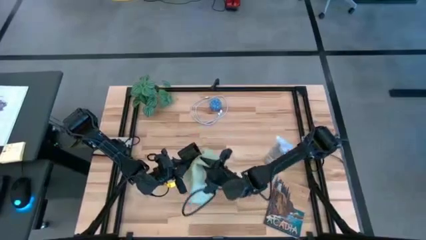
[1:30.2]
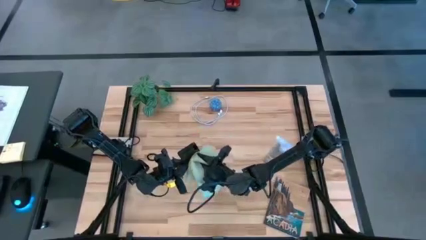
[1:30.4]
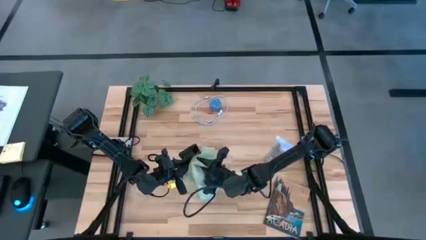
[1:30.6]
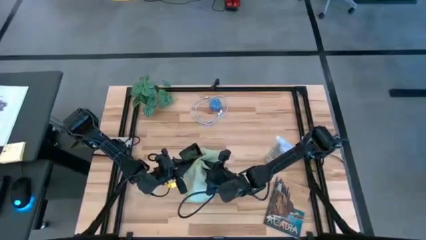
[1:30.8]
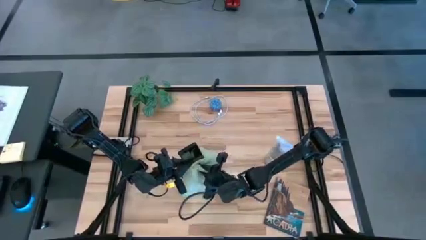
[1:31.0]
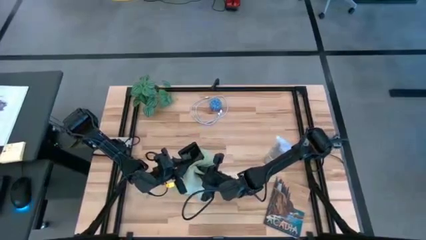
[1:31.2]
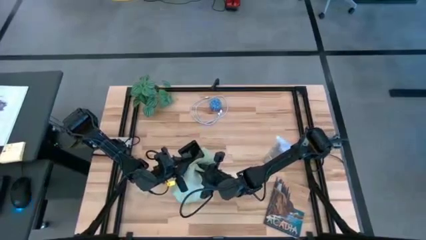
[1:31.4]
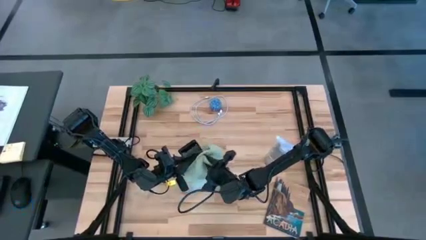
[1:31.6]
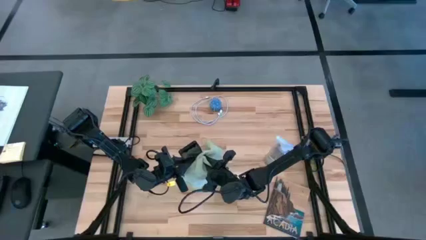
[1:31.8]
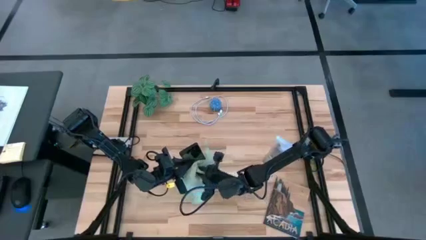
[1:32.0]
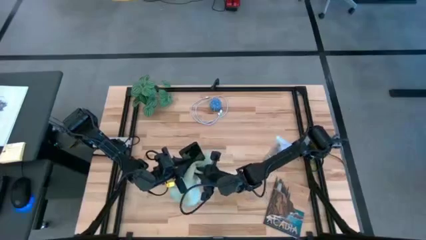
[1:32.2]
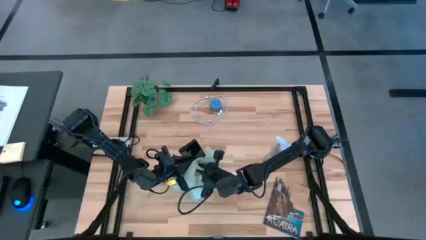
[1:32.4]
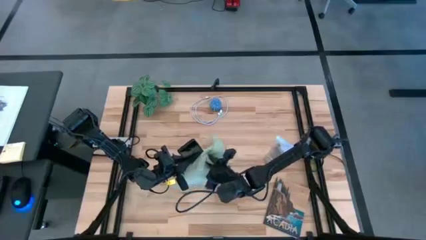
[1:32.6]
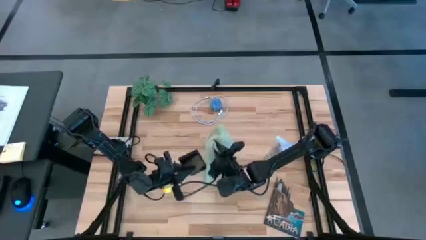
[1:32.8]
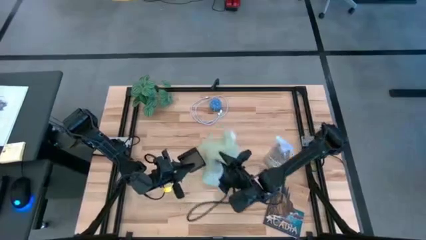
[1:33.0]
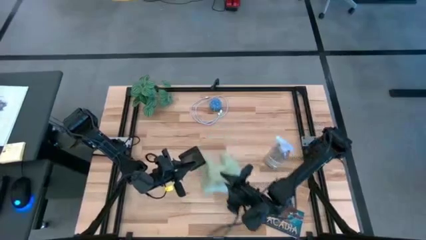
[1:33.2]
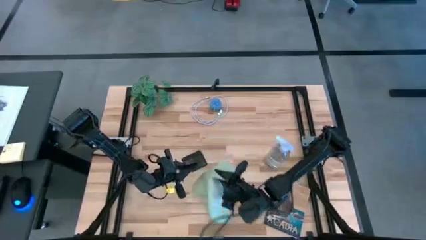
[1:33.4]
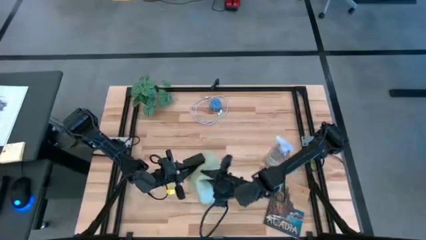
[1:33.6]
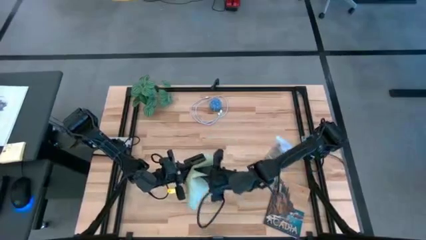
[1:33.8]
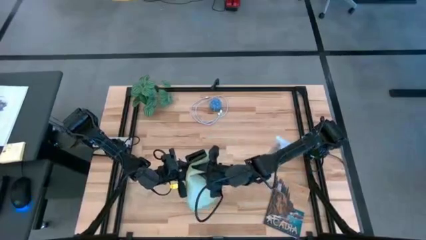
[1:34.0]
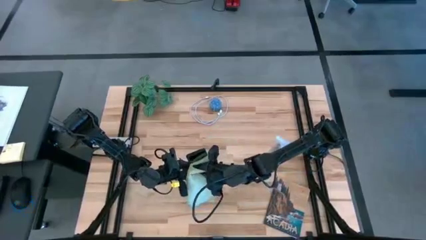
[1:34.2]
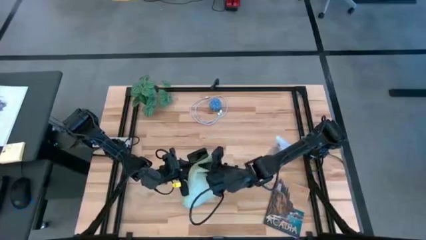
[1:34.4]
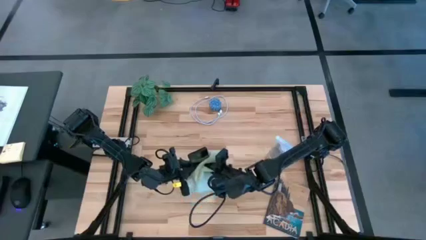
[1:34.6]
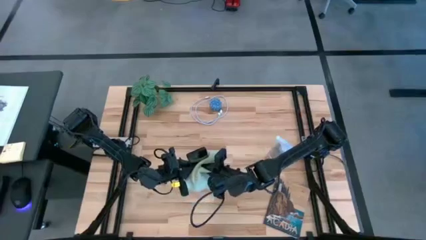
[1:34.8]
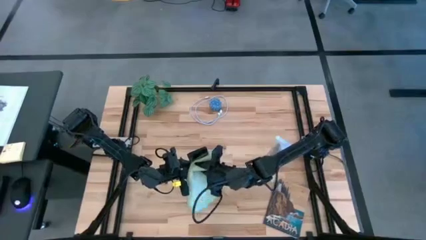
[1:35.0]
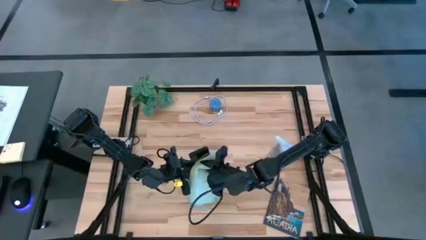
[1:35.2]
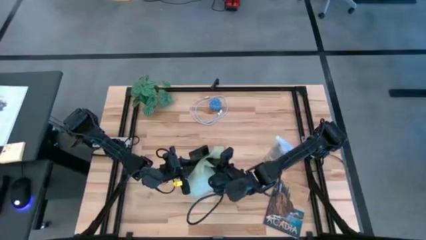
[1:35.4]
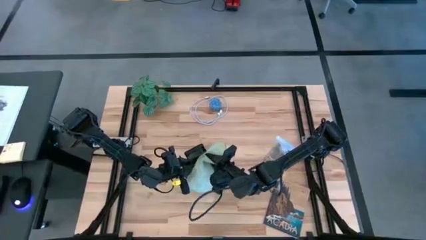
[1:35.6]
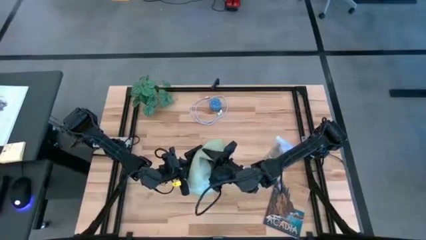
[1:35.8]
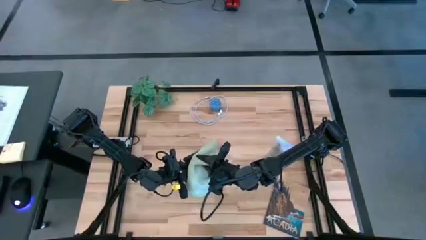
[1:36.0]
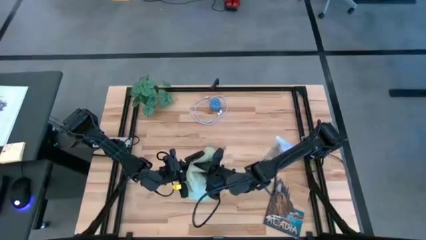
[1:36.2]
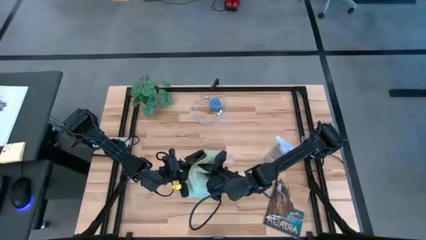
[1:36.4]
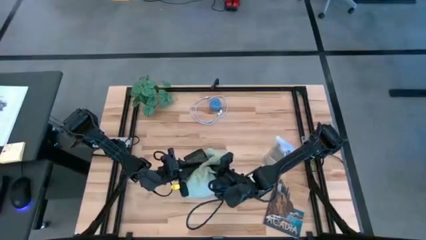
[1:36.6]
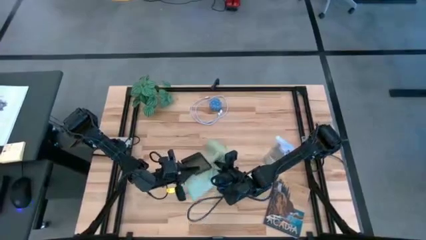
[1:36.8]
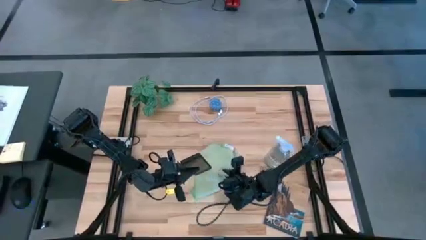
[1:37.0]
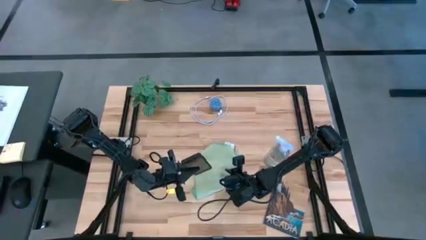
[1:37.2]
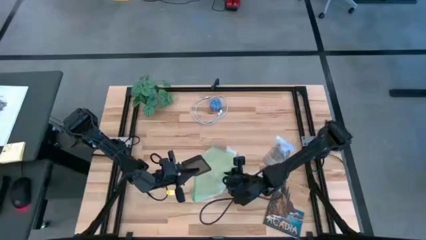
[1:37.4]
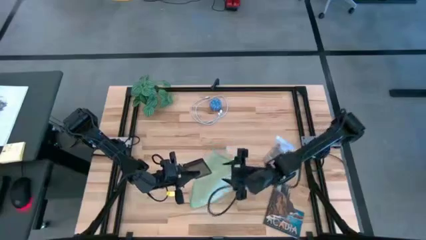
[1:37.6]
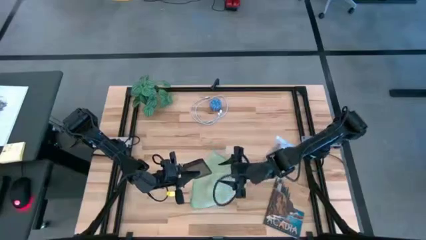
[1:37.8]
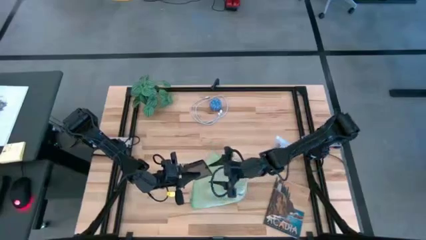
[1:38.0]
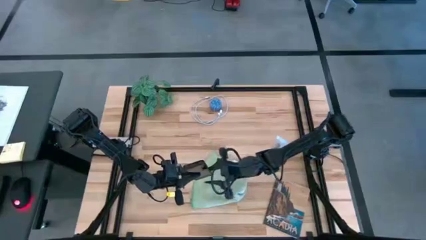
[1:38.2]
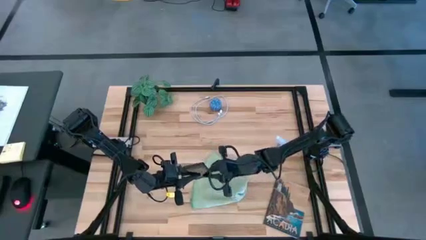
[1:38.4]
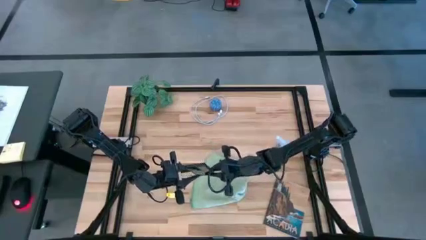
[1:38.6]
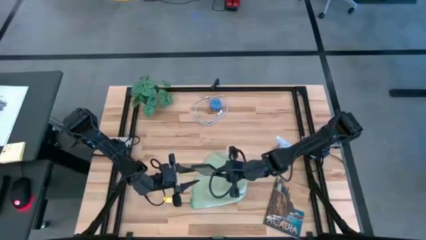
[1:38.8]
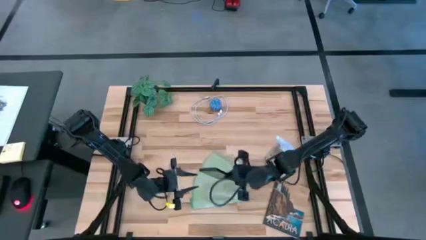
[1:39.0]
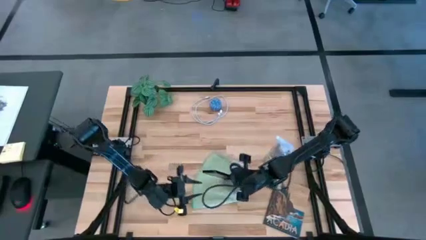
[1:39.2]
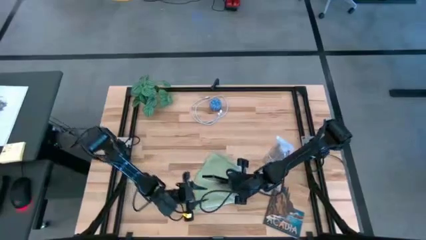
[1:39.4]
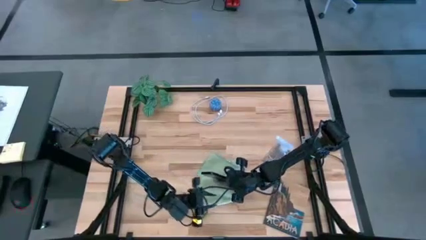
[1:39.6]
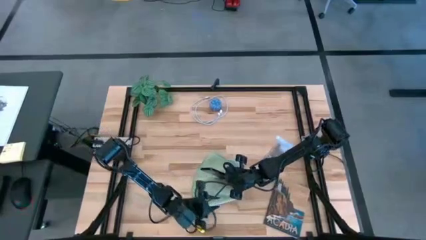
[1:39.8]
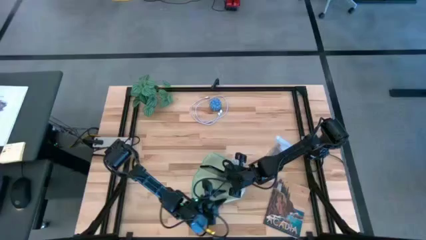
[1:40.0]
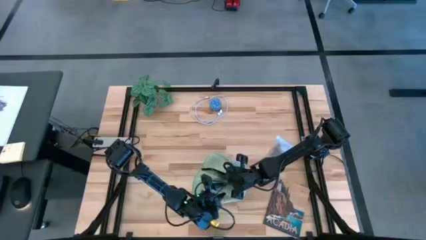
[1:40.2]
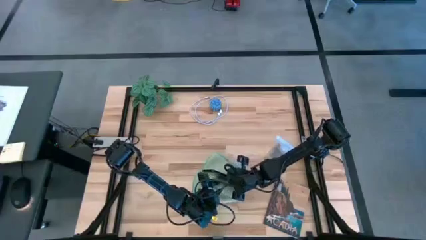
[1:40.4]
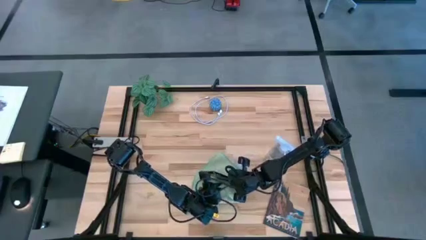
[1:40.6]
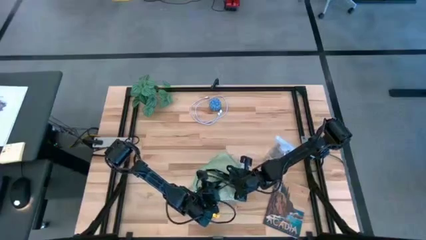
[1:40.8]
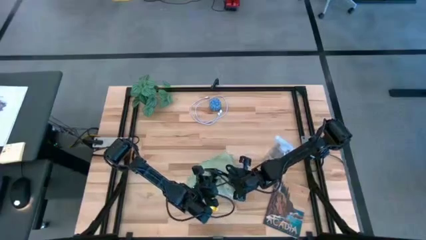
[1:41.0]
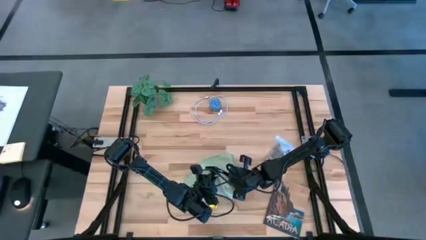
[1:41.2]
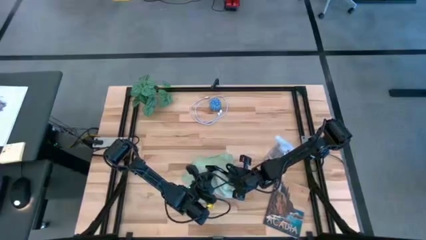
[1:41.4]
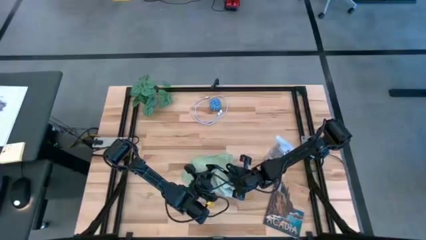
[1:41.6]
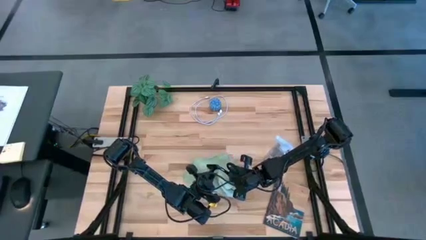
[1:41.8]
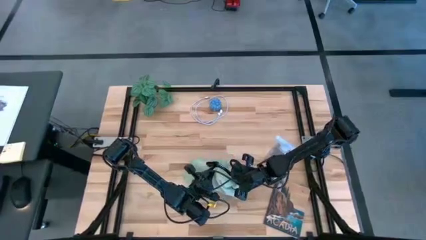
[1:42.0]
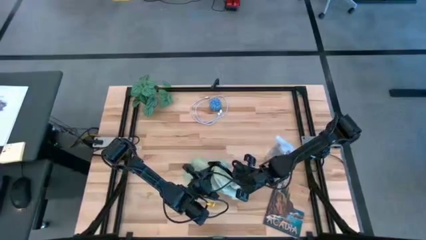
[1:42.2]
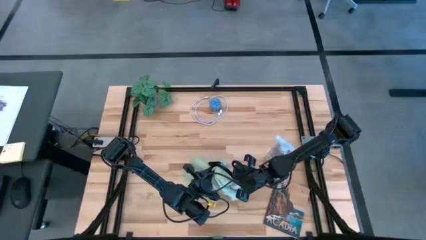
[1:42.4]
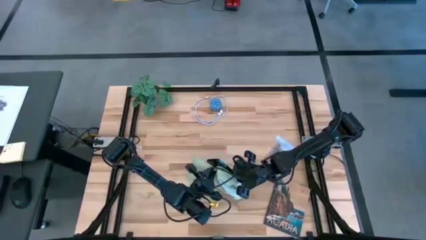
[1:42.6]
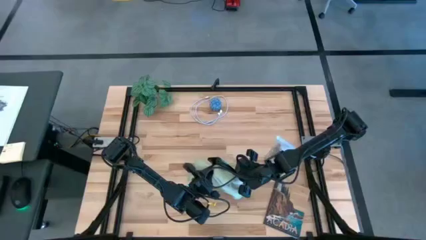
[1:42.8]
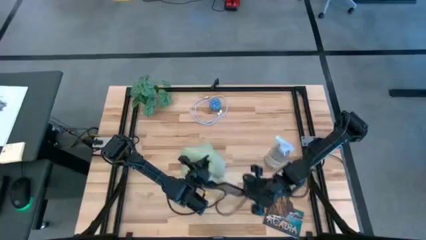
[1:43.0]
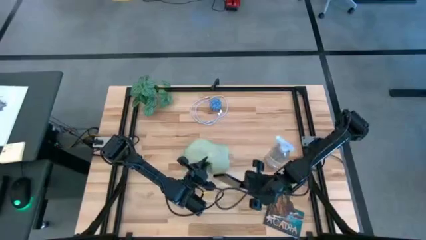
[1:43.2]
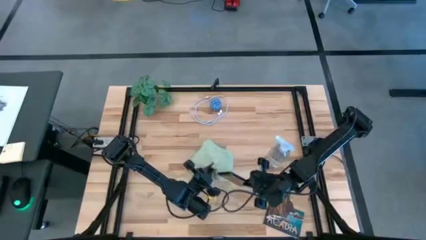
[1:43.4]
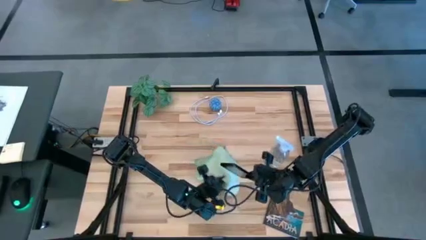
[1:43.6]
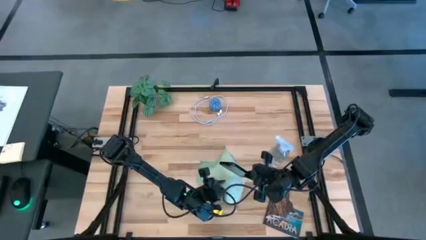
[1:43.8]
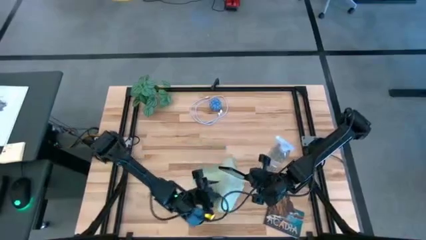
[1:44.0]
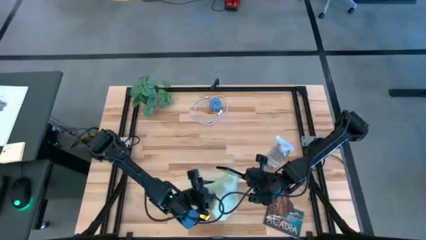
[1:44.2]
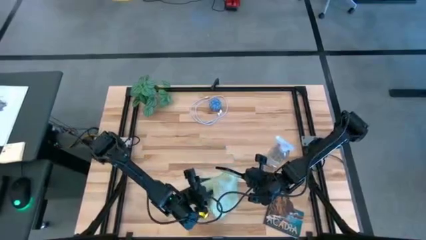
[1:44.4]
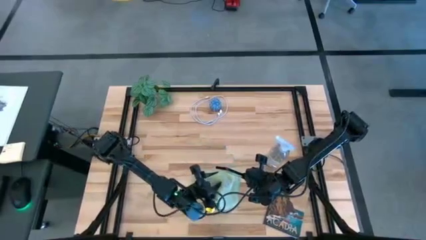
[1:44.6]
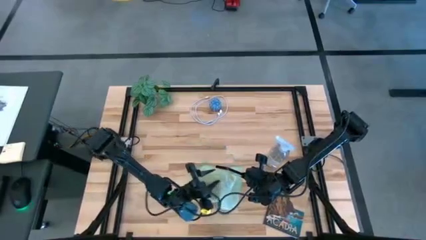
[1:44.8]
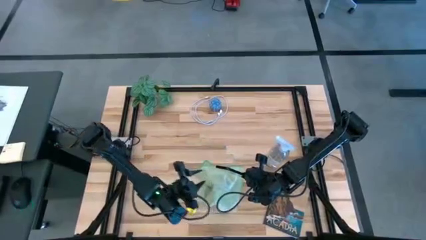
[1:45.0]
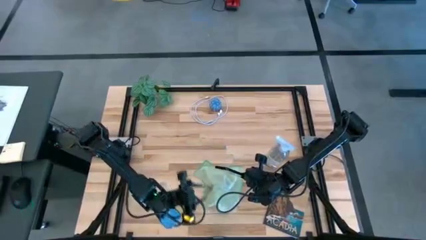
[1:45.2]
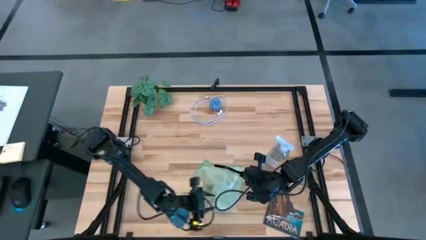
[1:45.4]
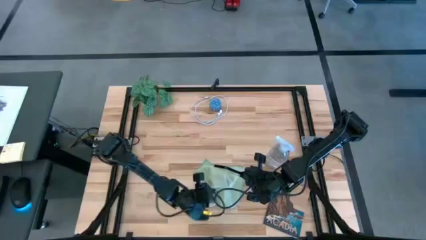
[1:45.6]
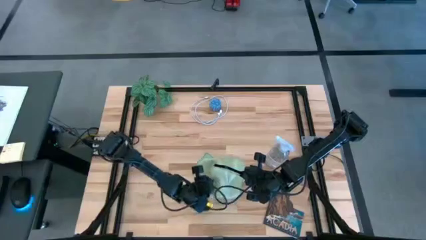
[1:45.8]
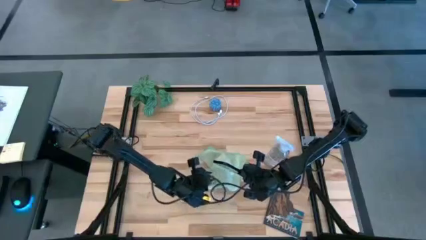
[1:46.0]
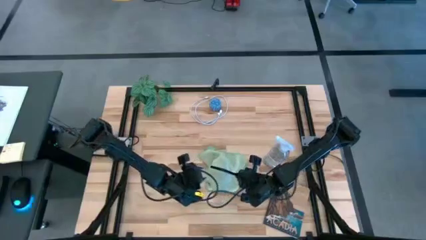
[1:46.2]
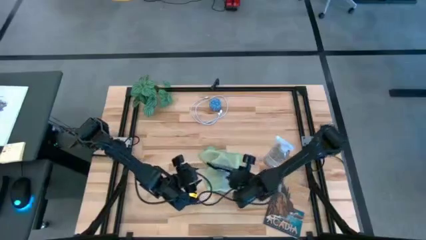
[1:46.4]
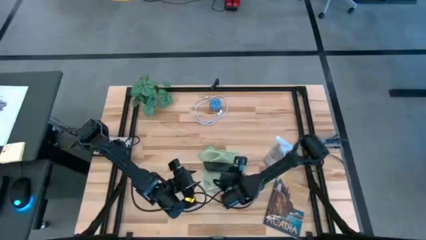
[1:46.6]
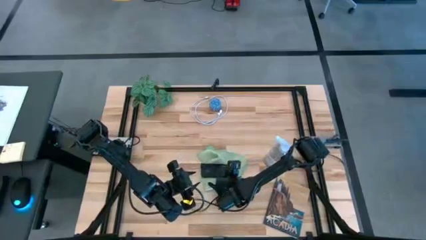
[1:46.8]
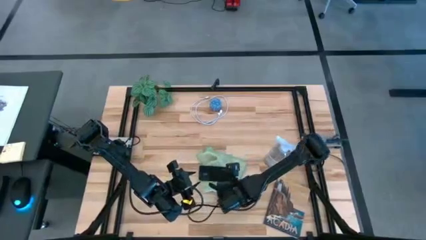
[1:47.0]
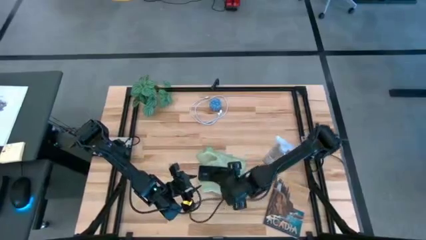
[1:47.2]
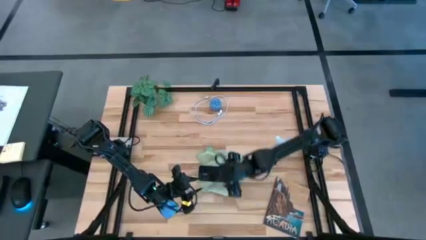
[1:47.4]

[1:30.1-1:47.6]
Task: Apply microfiber cloth
Wipe the front of the phone with the light green microfiber cloth
